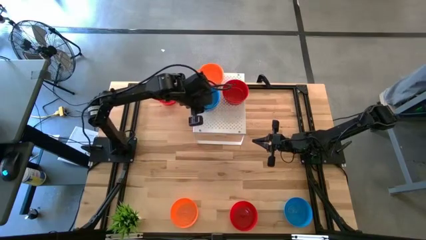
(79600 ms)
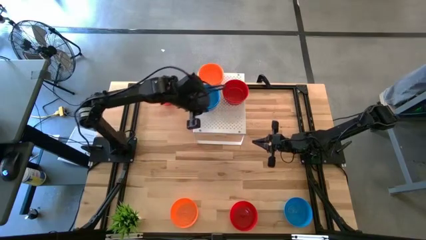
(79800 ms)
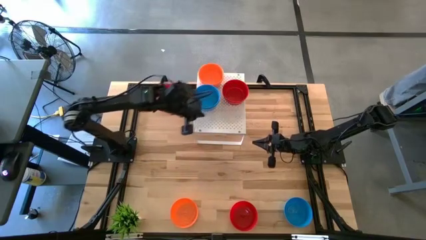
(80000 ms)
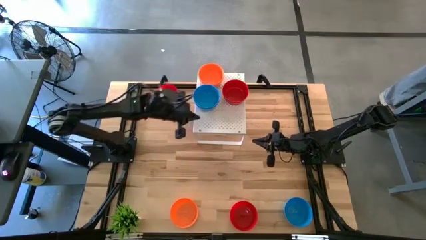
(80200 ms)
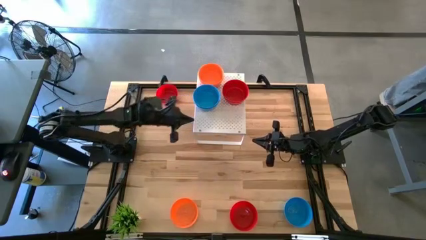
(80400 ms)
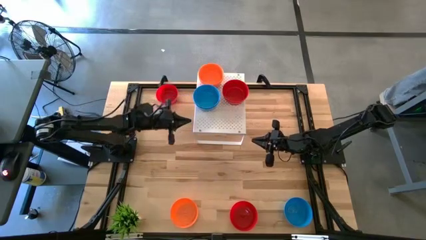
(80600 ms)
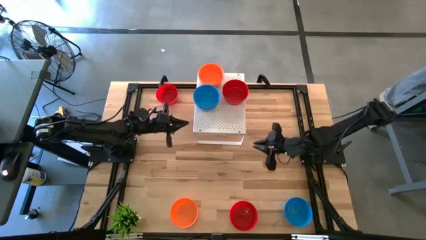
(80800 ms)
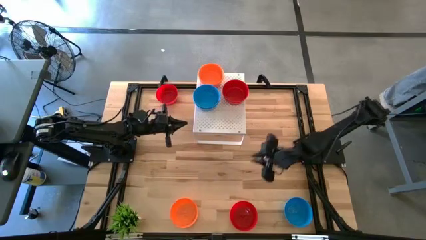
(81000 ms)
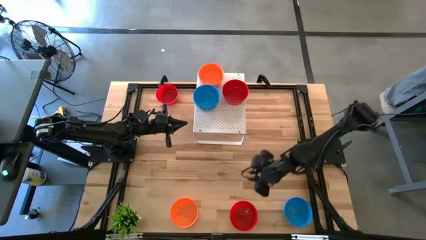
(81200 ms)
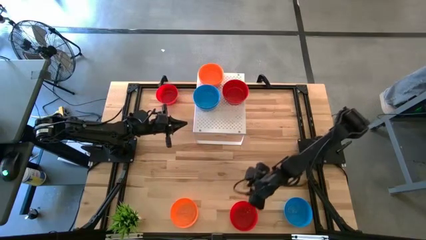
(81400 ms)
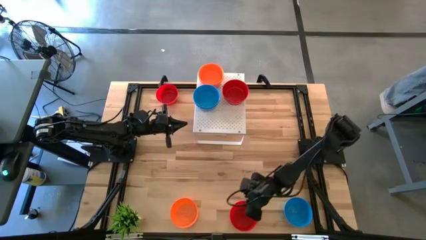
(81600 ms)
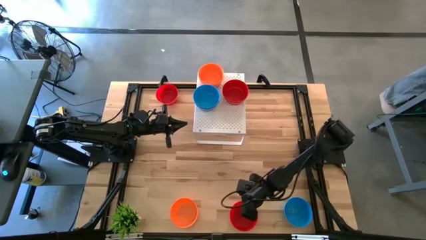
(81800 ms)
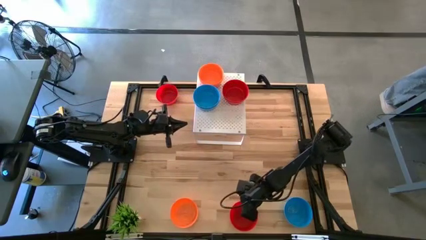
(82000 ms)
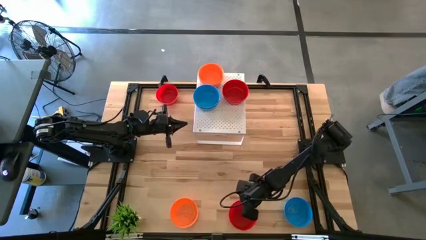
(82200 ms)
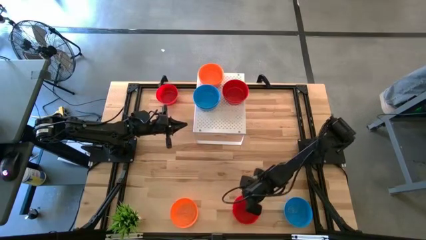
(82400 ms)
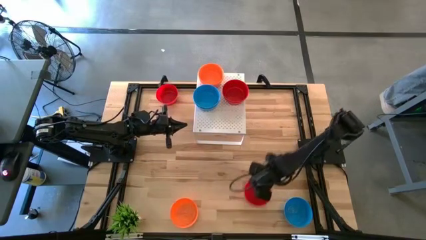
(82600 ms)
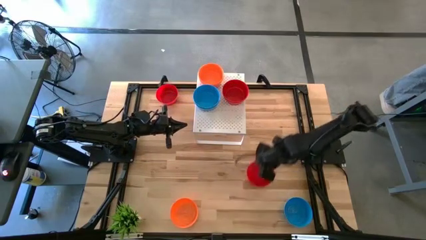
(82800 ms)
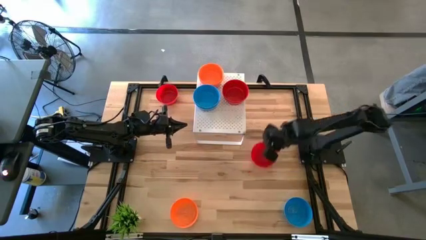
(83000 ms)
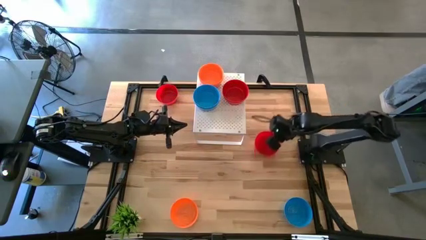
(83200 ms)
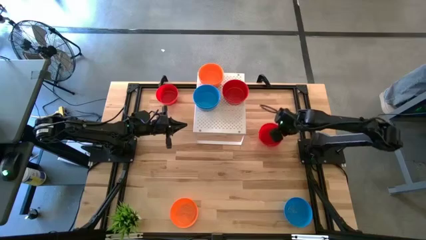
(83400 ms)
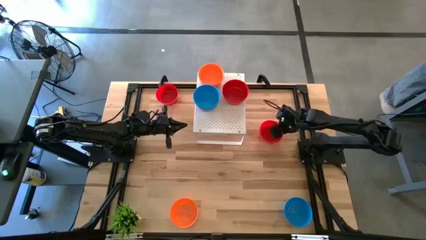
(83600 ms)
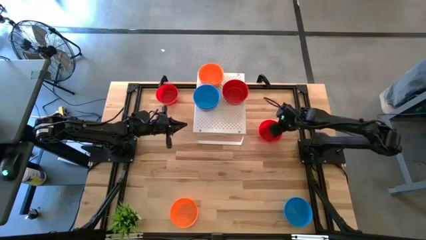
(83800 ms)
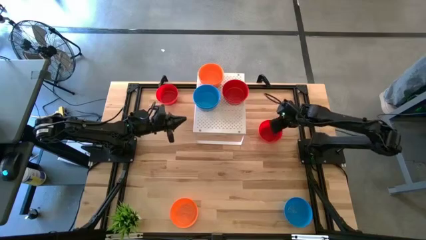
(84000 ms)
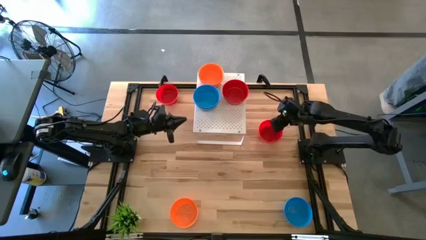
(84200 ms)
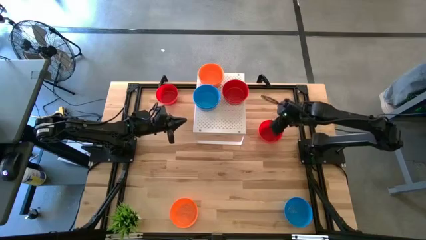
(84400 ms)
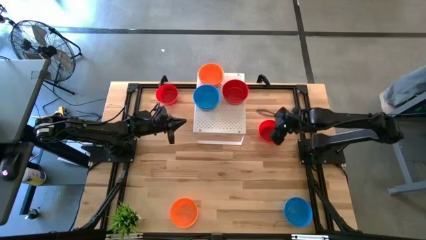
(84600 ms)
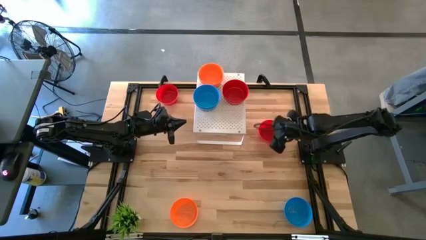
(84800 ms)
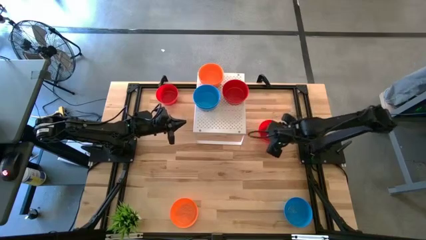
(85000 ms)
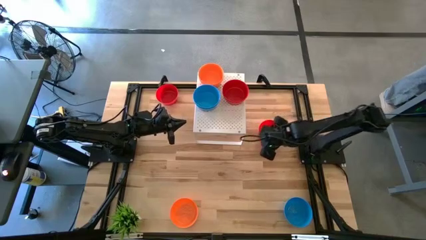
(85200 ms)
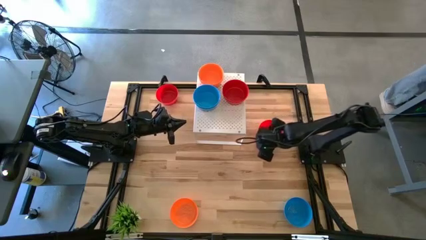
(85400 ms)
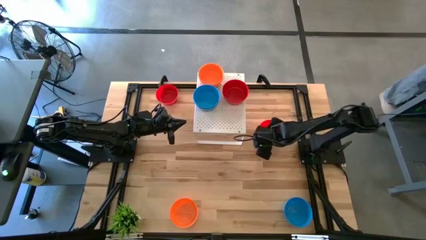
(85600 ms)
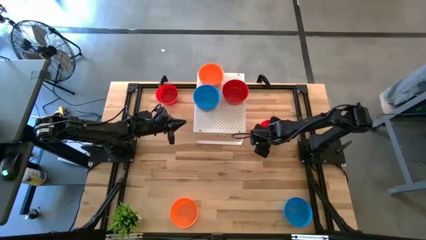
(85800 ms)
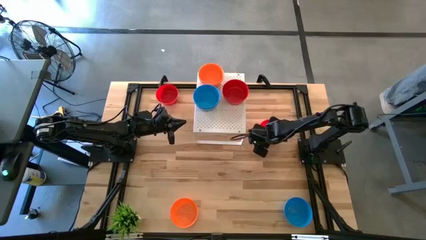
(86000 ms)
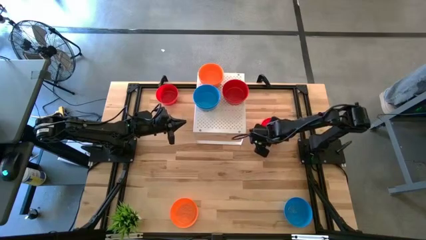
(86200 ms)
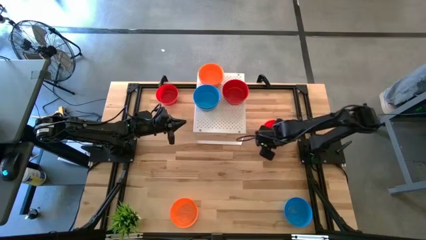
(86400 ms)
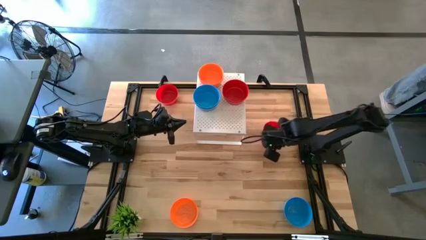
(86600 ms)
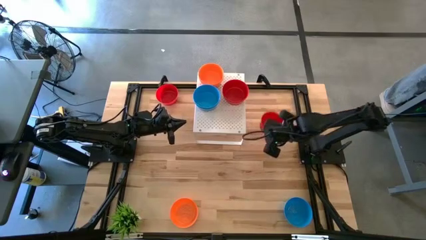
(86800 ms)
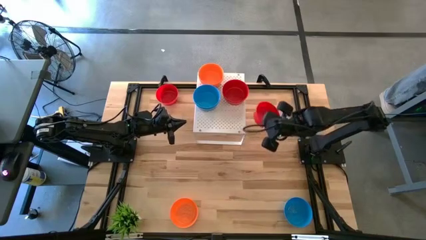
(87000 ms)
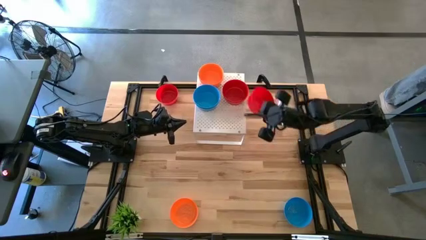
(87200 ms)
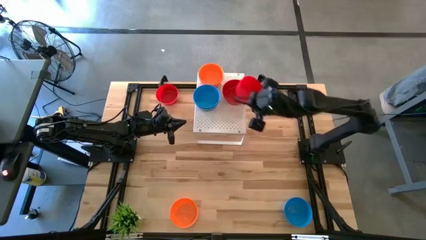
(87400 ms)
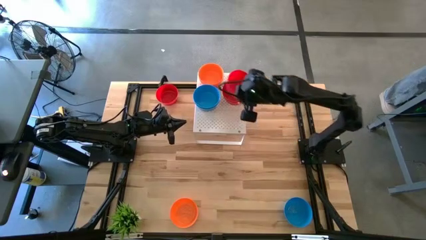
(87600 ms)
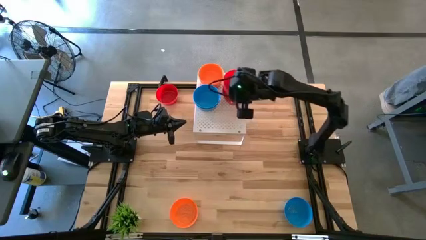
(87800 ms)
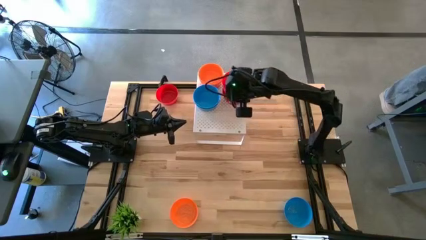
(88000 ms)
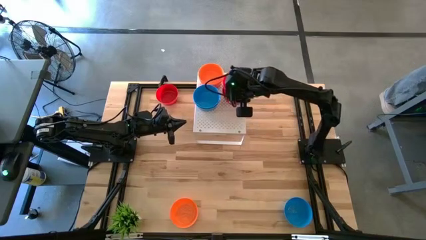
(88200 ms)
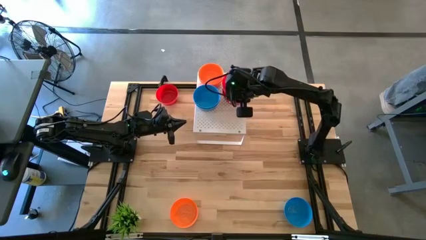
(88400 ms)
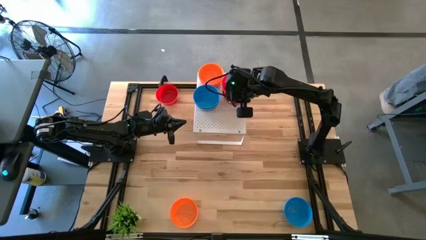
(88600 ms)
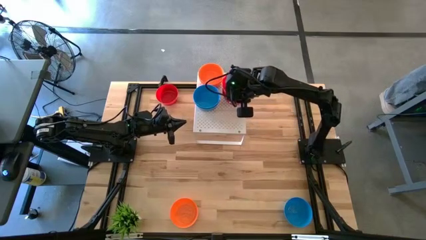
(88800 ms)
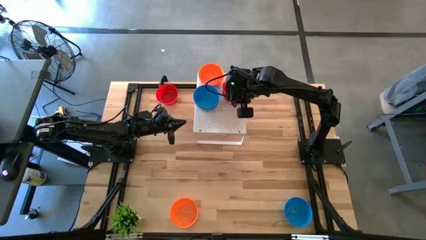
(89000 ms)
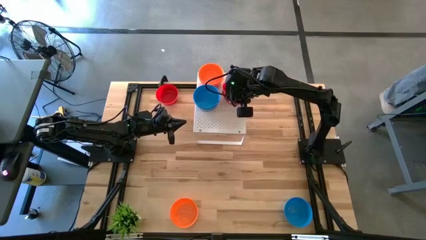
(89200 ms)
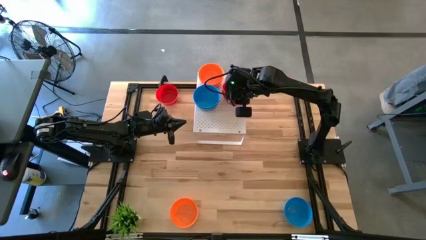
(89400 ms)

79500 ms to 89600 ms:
Task: Pick & Place Mini bowls
Stack the red bowl on top of the red bowls on the shelf

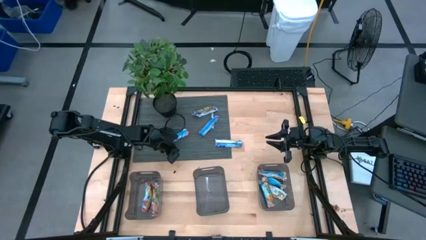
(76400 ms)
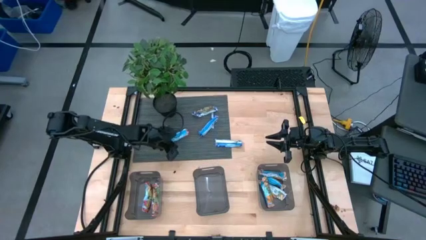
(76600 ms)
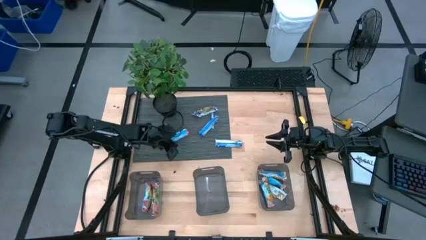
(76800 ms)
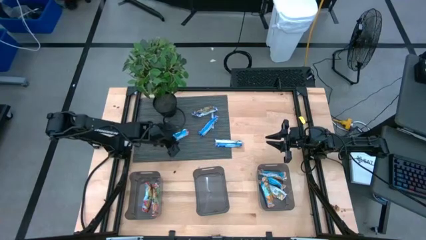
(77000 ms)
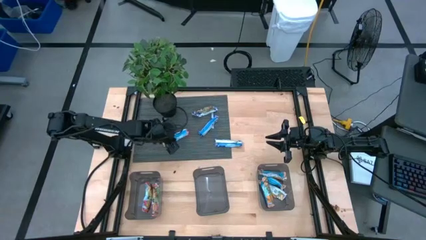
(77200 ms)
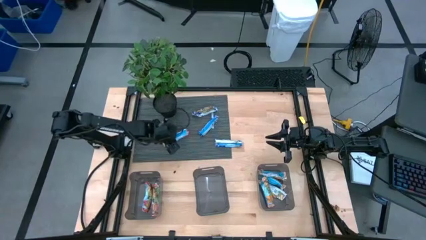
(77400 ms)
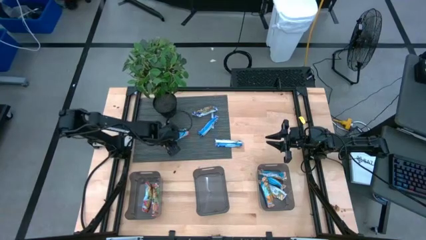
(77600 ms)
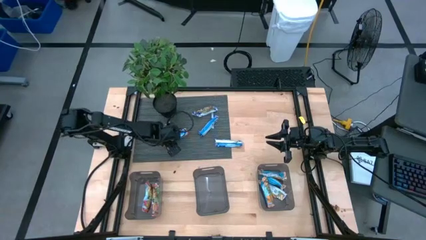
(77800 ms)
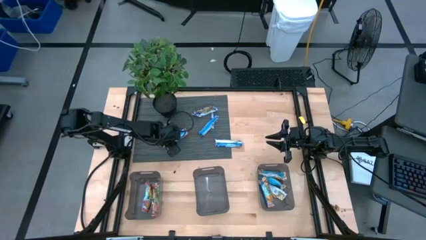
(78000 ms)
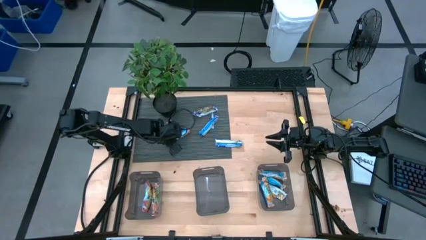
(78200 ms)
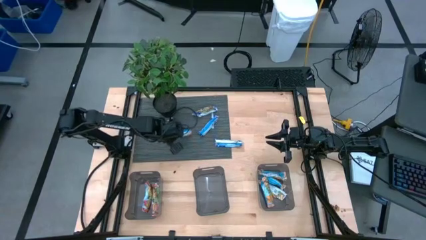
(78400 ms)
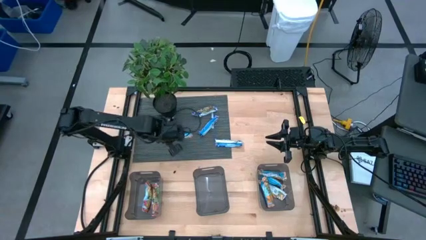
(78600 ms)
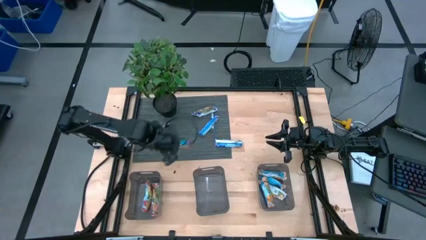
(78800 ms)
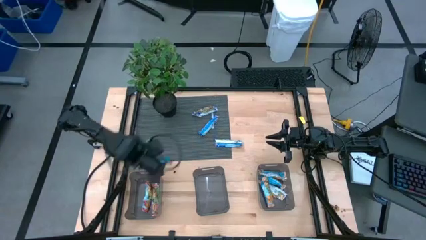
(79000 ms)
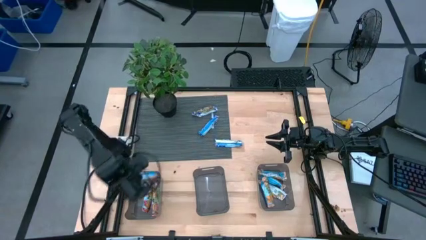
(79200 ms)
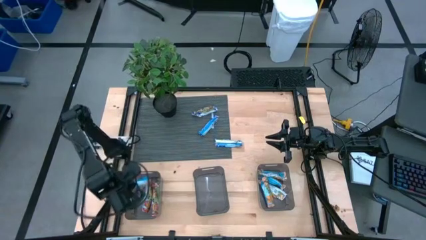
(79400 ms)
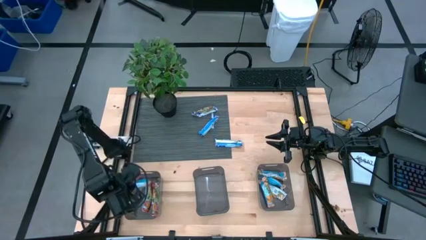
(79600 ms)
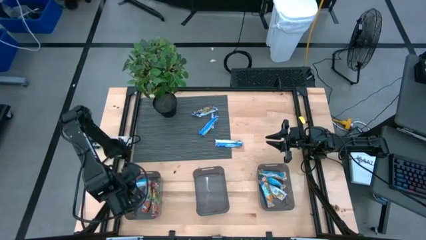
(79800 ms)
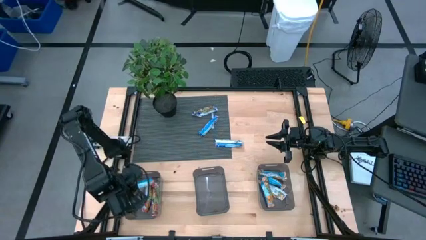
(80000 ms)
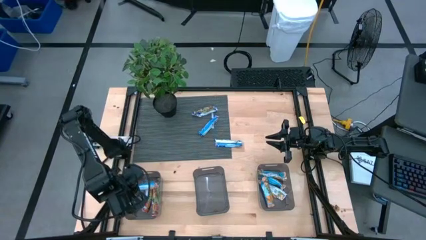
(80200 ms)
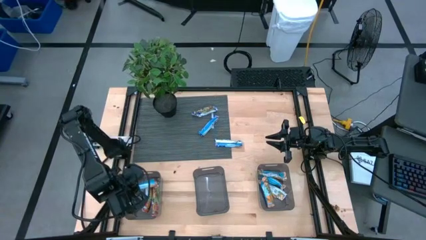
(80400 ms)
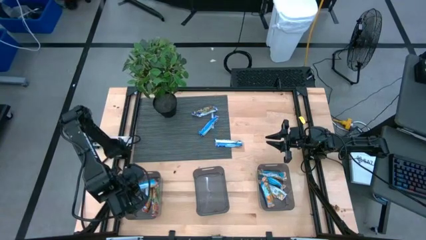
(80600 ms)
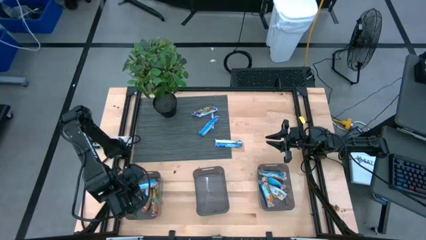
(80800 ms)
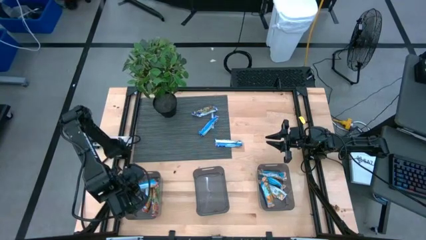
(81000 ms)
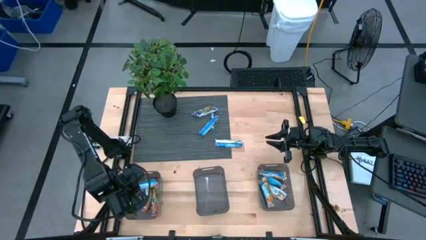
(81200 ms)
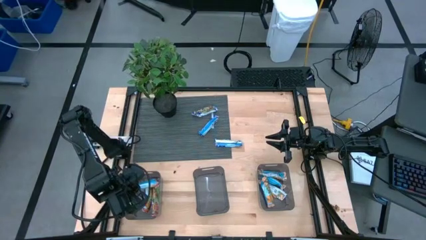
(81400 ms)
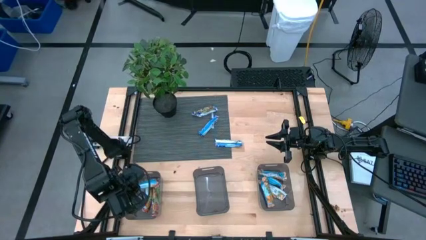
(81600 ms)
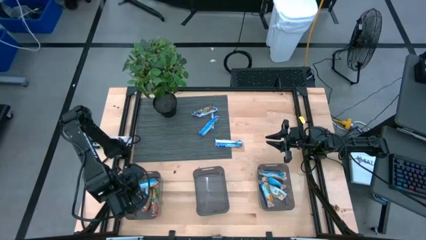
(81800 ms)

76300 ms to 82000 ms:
Task: Pick and place Granola Bars by type
Put the red granola bar into the left black bin

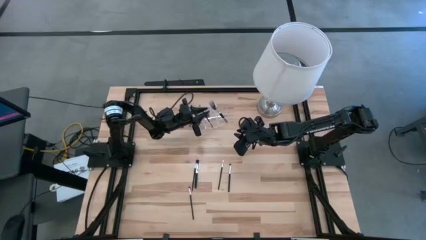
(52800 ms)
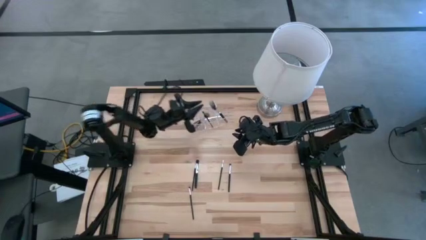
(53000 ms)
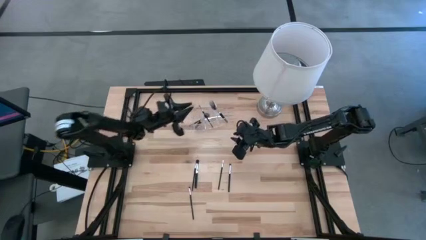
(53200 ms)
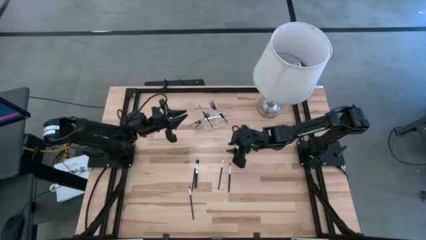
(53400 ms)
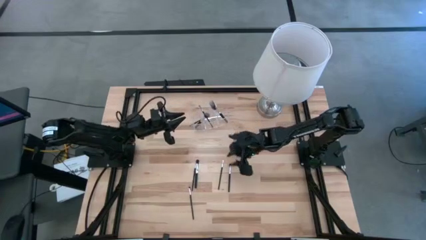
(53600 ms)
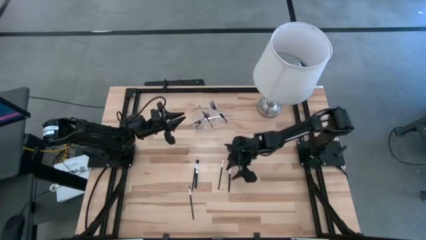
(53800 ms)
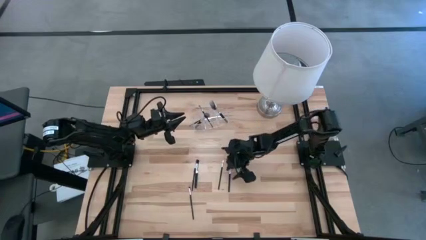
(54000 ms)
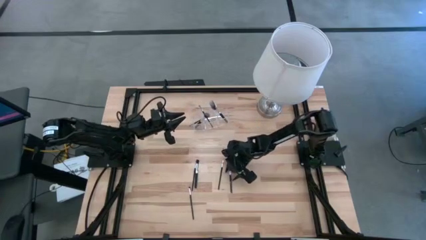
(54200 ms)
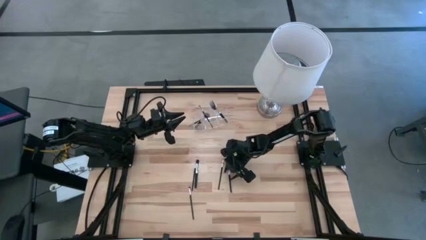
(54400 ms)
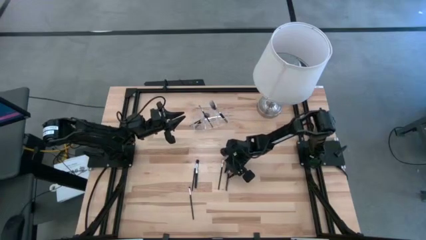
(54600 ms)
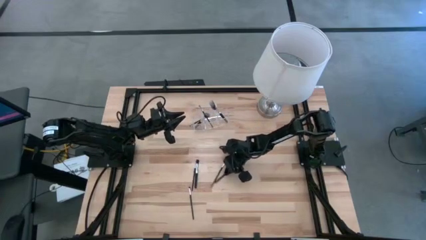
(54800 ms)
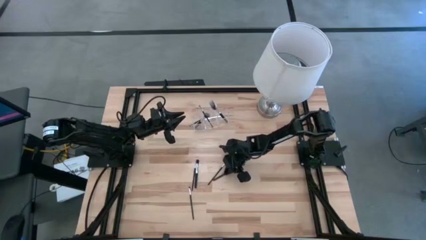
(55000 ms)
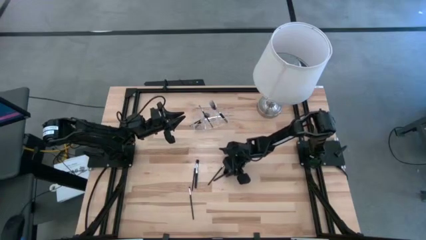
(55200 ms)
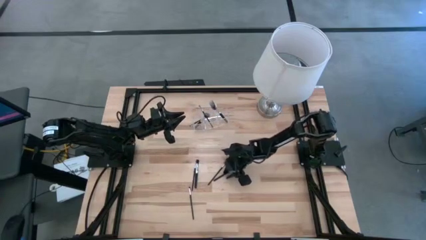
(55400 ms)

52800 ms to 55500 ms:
Task: Sort items
Put the foundation brush into the transparent organizer
